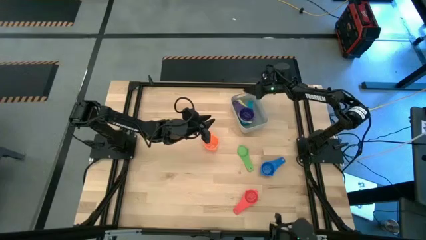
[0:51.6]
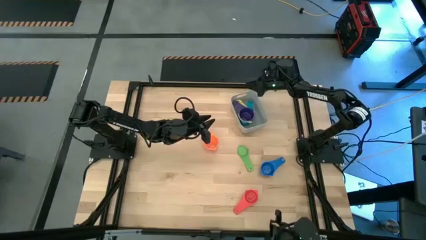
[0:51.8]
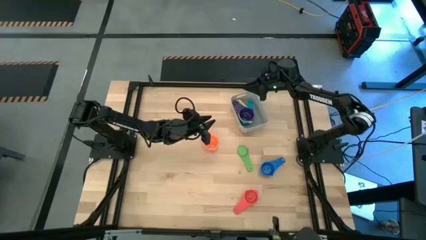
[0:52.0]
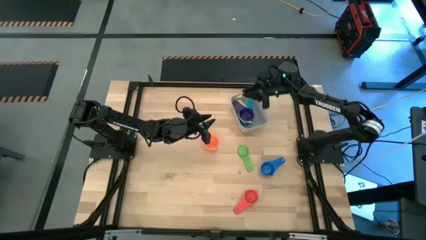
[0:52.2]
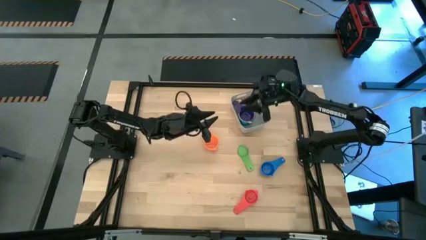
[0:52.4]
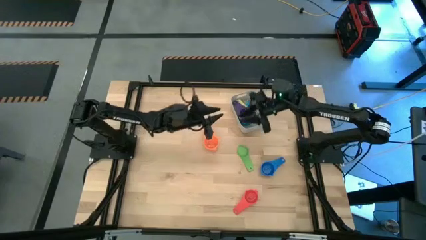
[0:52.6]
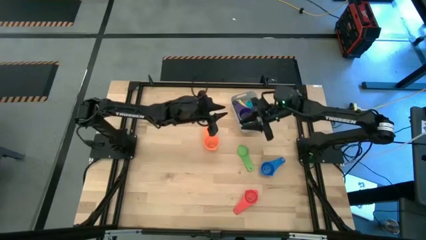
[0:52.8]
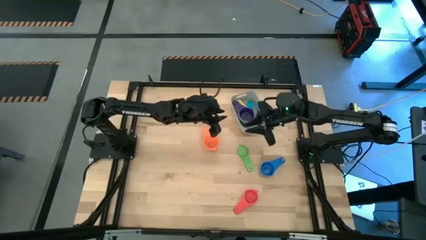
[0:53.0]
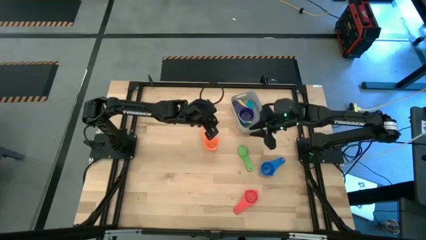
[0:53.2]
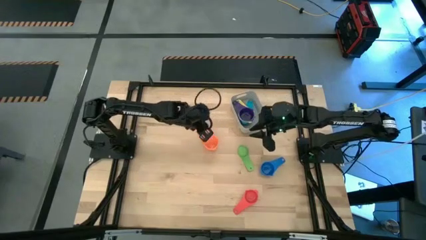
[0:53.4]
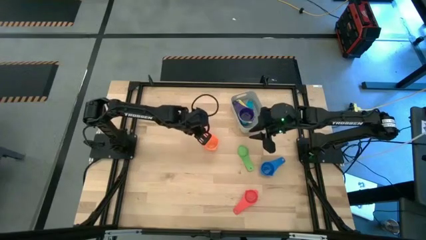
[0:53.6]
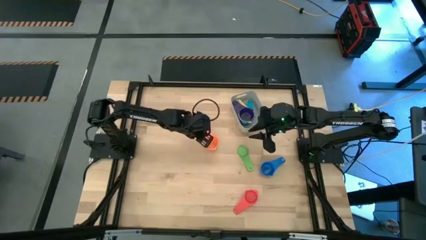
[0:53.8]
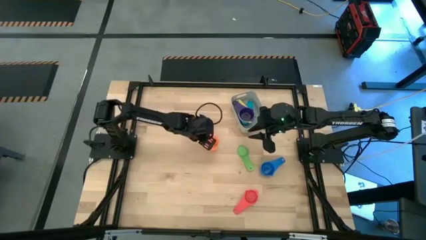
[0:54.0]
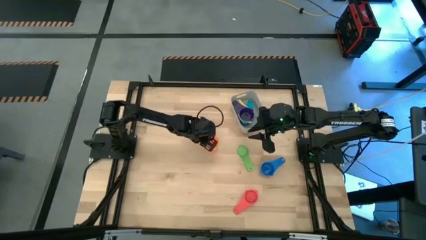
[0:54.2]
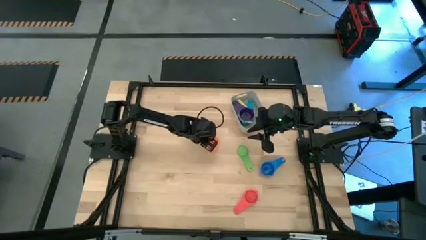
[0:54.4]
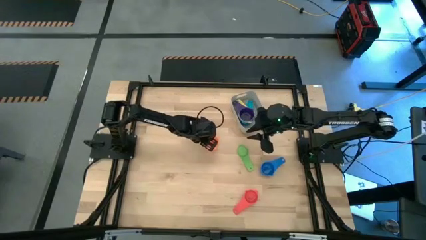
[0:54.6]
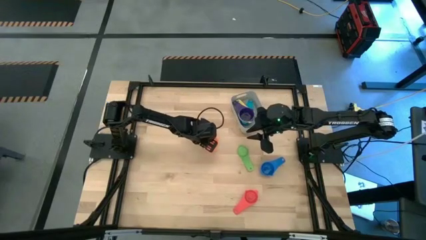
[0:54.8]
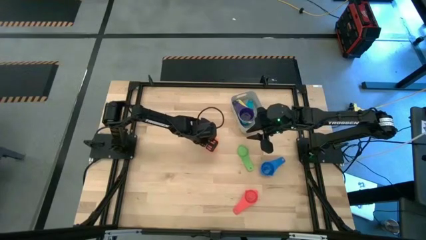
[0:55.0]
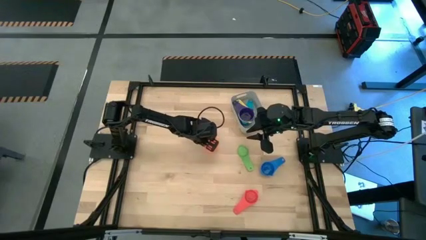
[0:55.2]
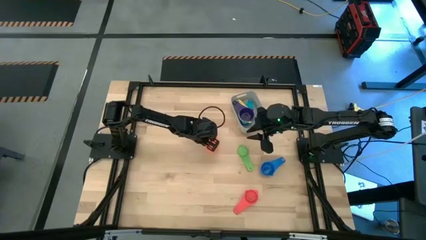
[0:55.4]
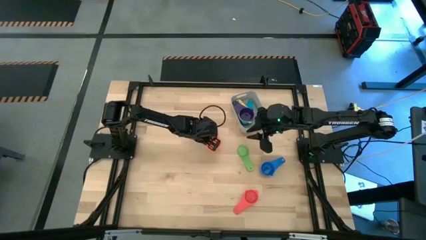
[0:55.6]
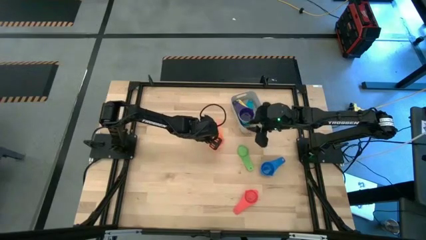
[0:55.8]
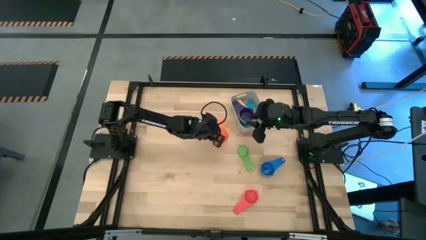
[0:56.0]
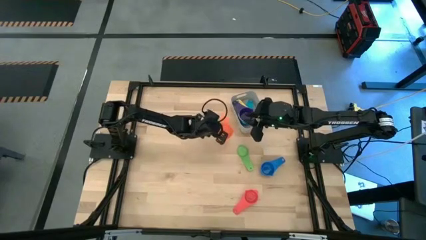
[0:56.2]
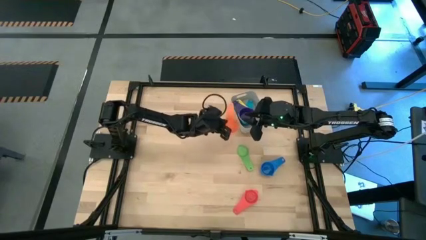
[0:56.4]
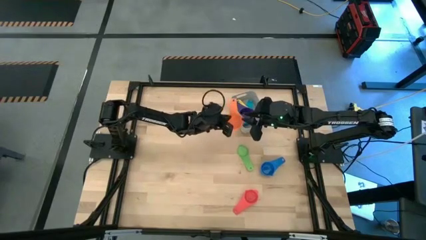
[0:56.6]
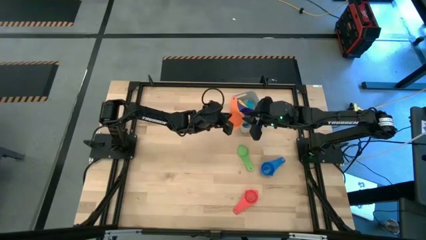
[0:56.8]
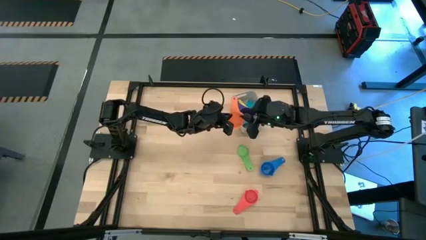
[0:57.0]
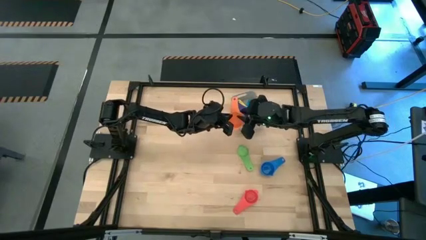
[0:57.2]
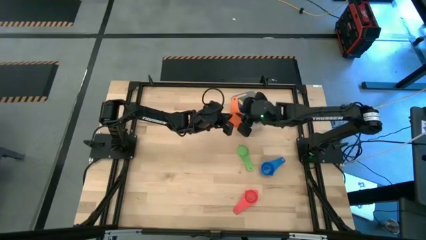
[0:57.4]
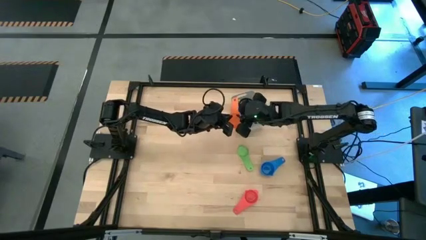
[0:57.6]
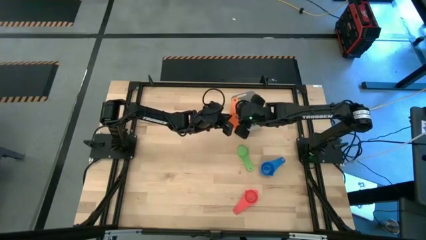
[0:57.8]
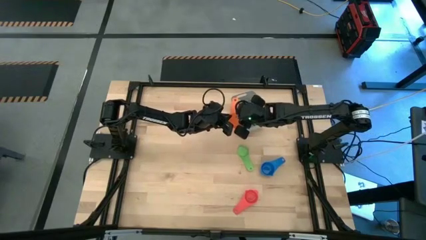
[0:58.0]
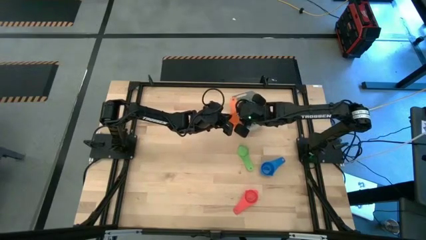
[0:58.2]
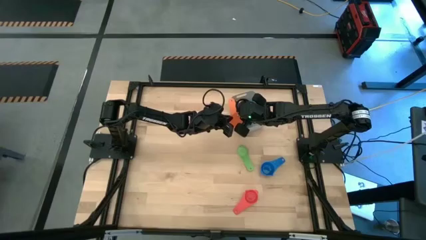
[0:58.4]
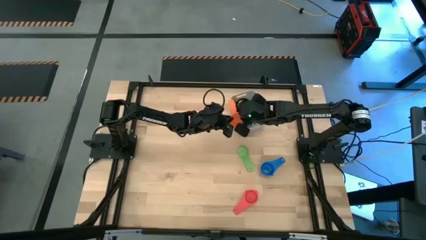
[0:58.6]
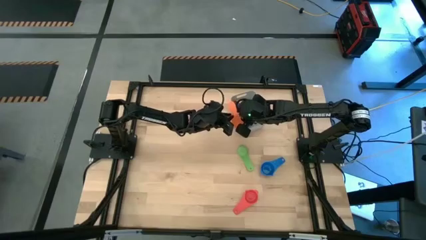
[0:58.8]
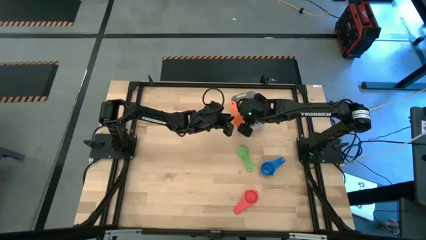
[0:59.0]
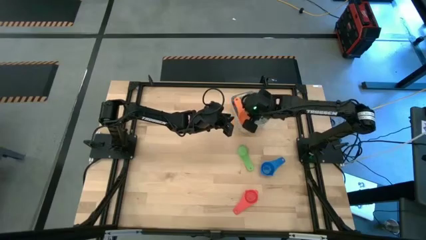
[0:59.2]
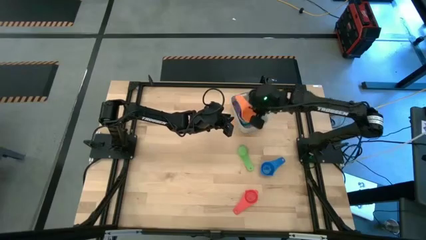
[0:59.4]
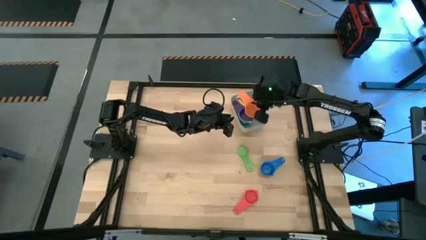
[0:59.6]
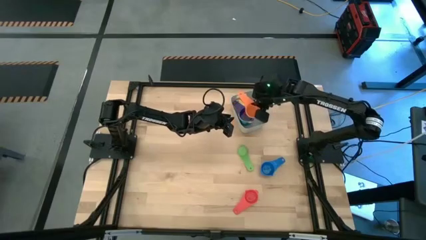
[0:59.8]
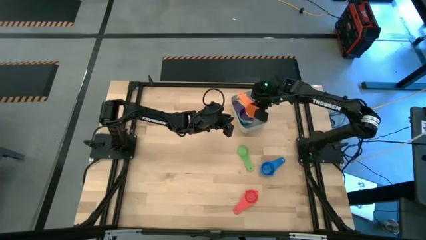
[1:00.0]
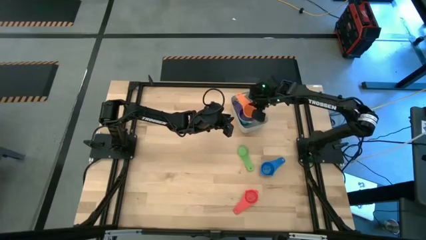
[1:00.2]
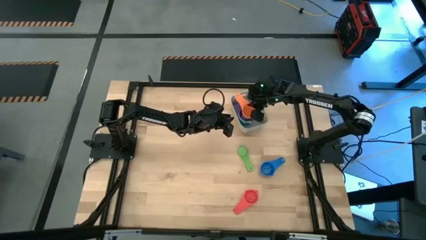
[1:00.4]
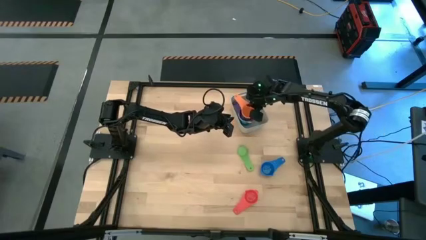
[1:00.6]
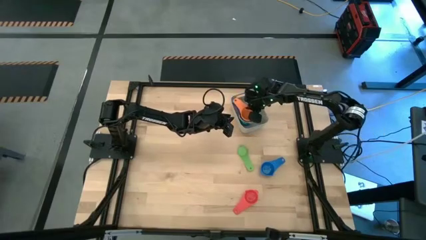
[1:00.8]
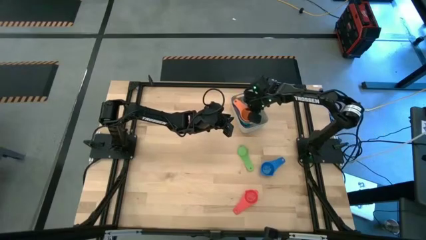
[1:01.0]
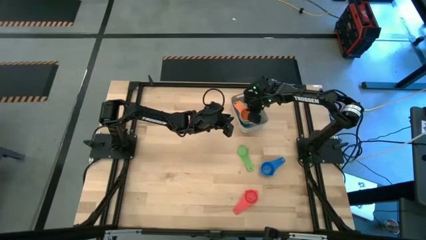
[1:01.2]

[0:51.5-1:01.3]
Task: Nest measuring cups in basket
Stack the orange measuring cup on top of the violet measuring cup into the gray bin
